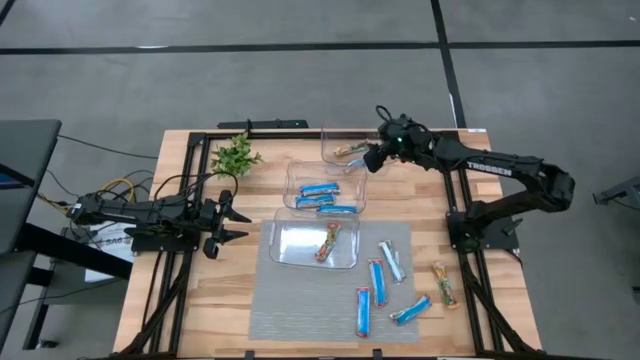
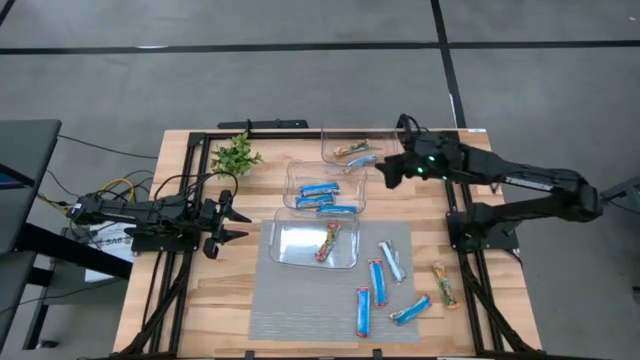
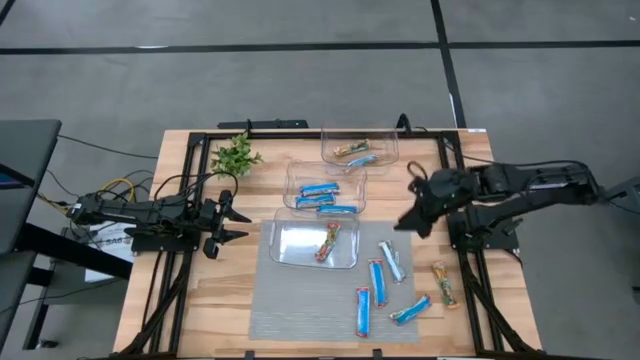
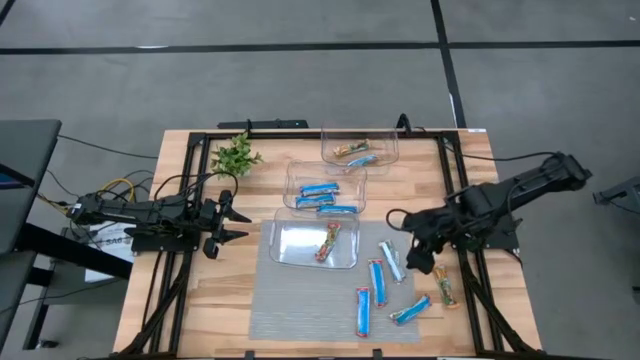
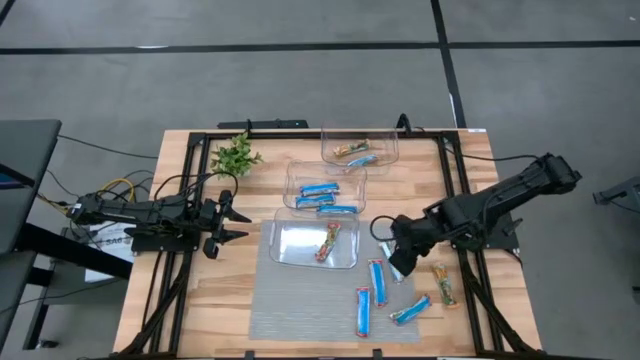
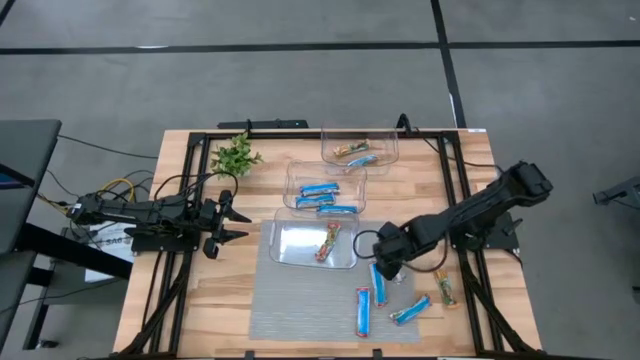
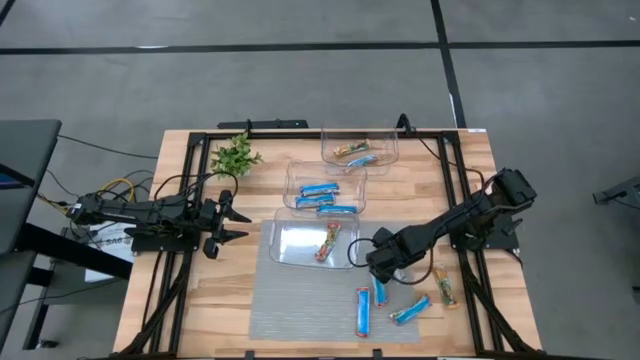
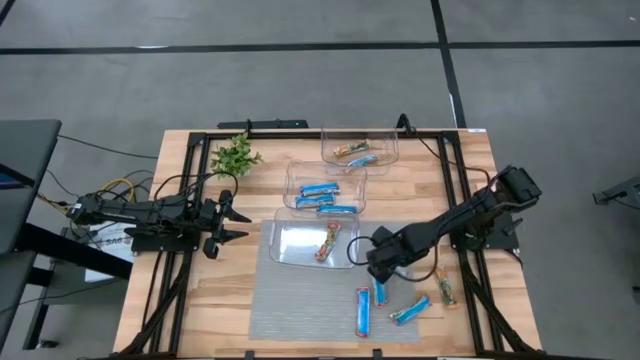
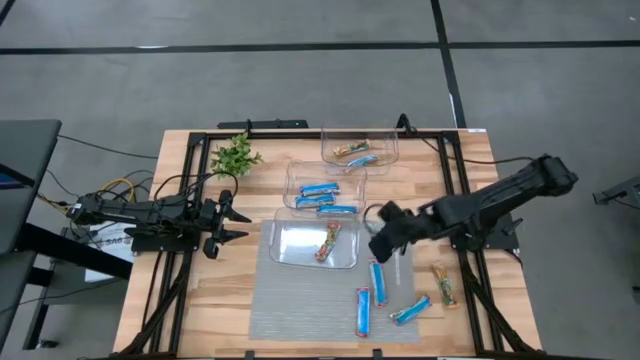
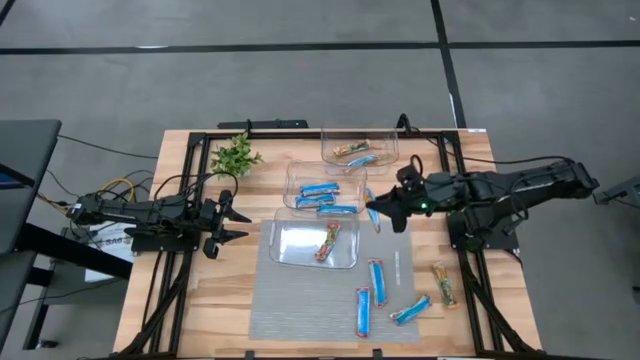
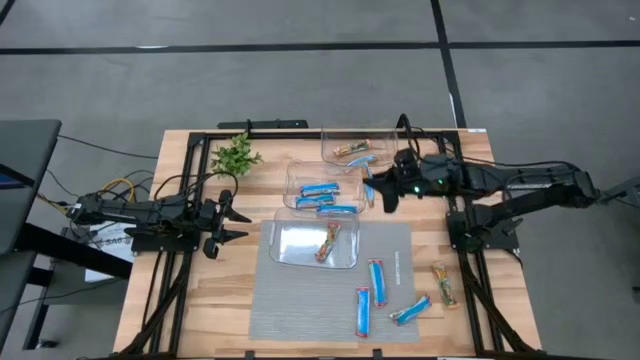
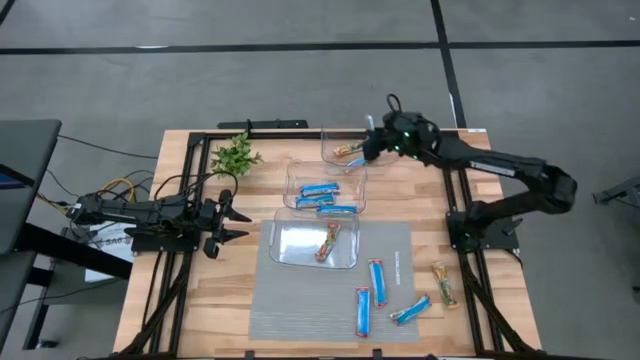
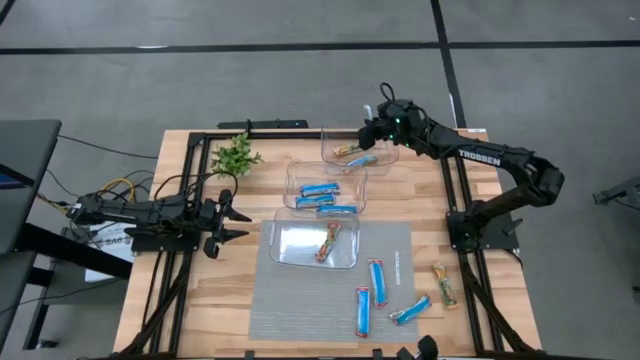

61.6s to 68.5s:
Task: Pick and place Granola Bars by type
Put the yellow granola bar into the top transparent bin

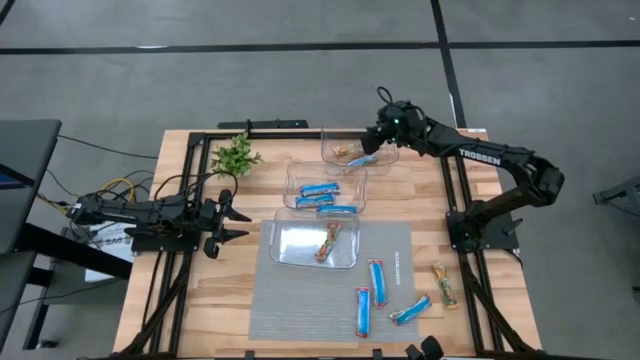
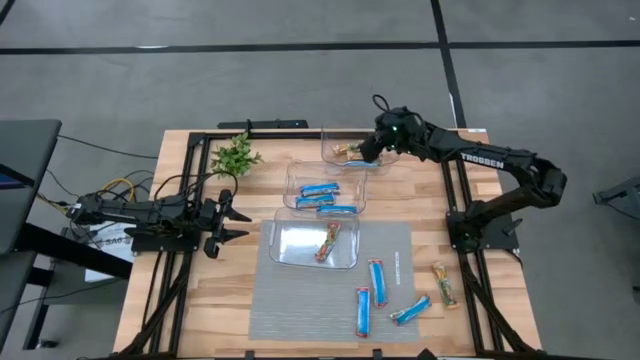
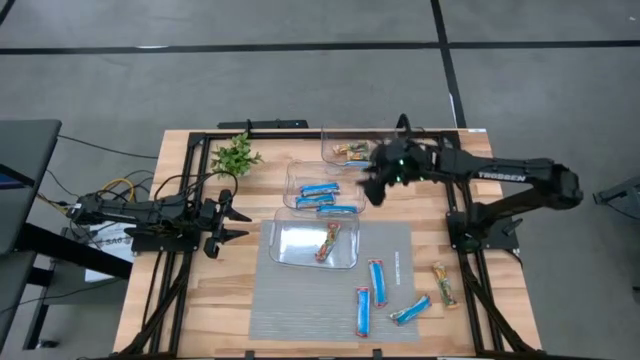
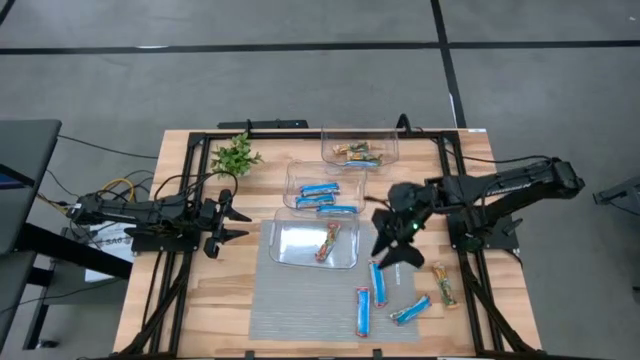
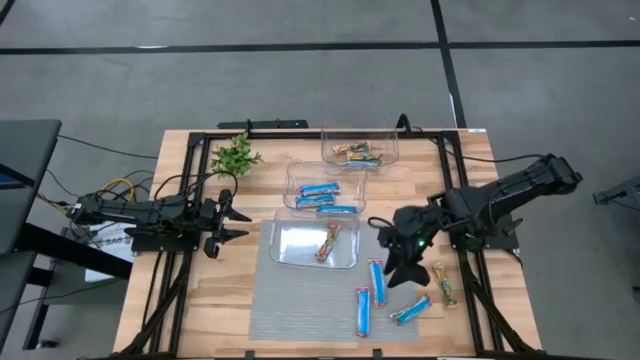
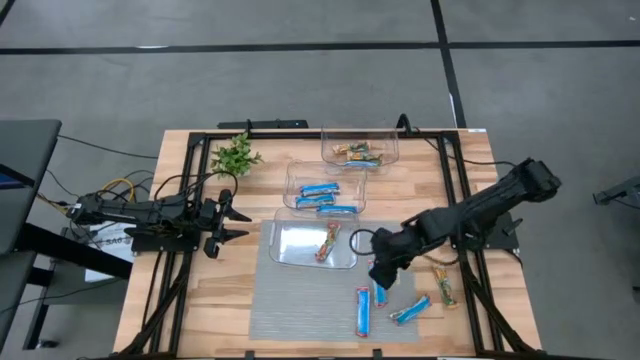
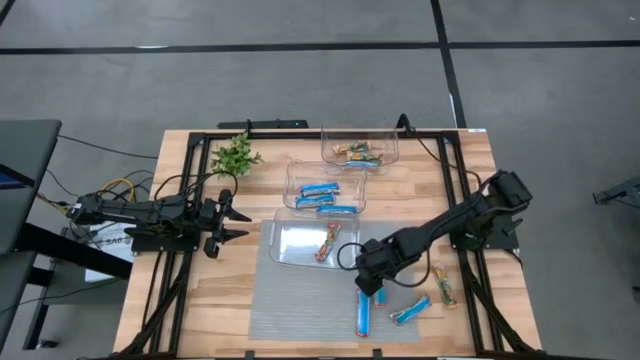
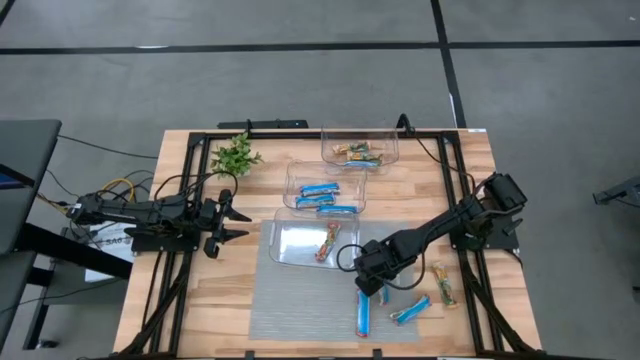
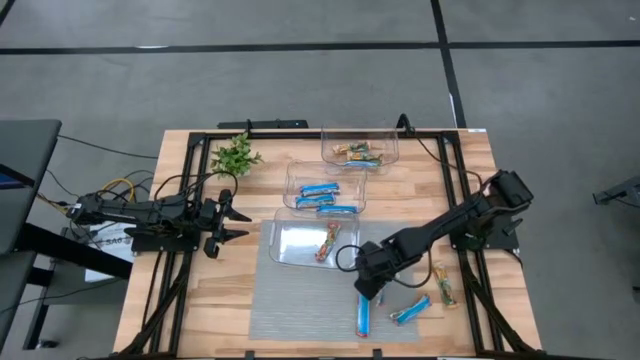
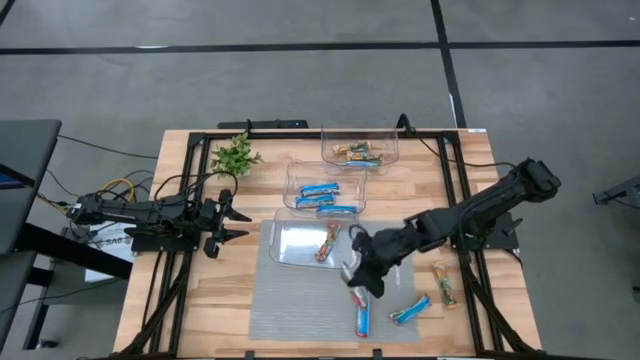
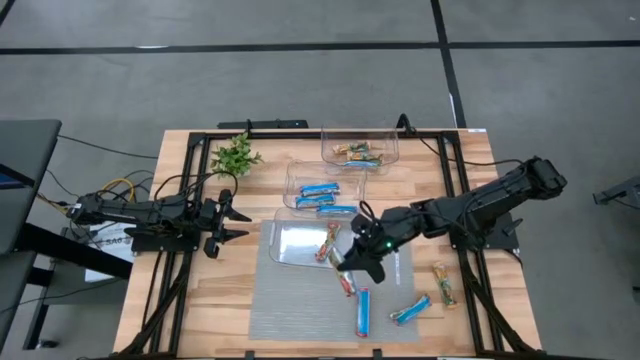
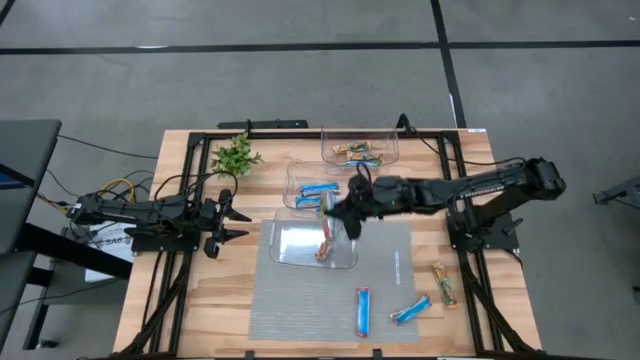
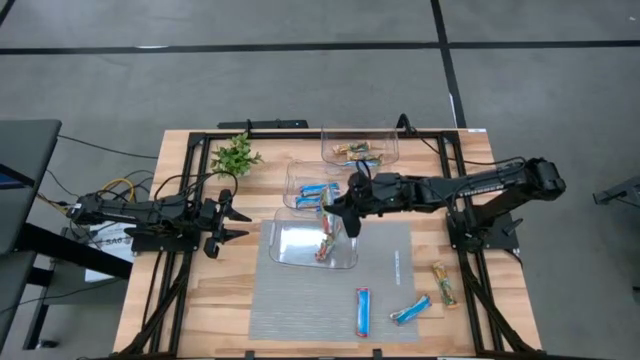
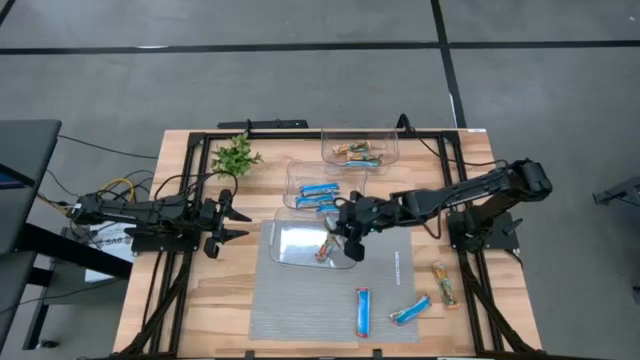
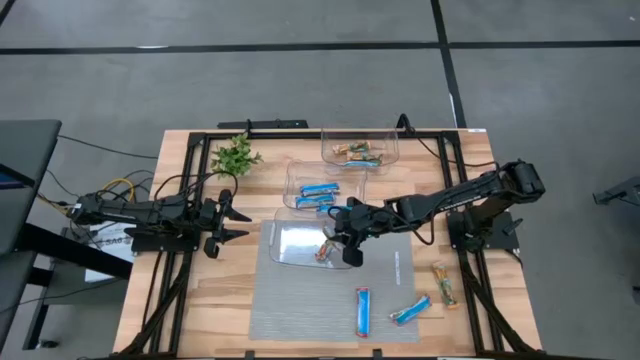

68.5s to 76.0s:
Put the red granola bar into the bottom transparent bin

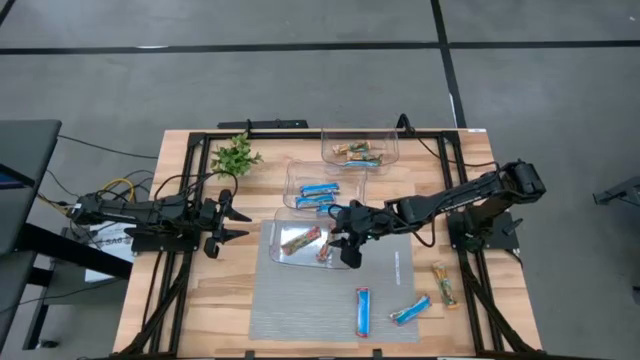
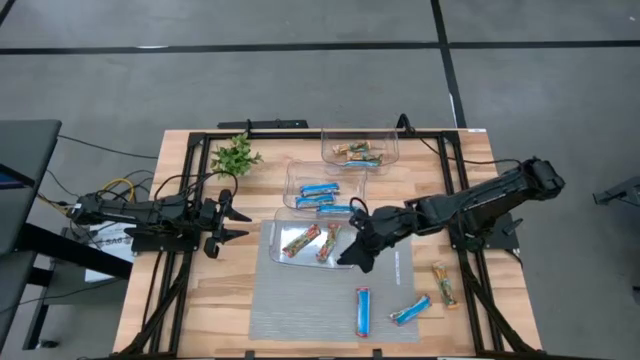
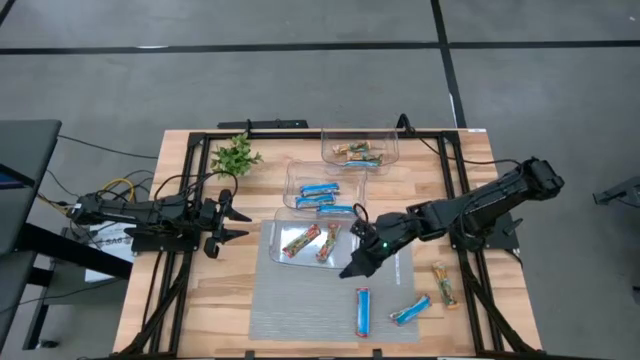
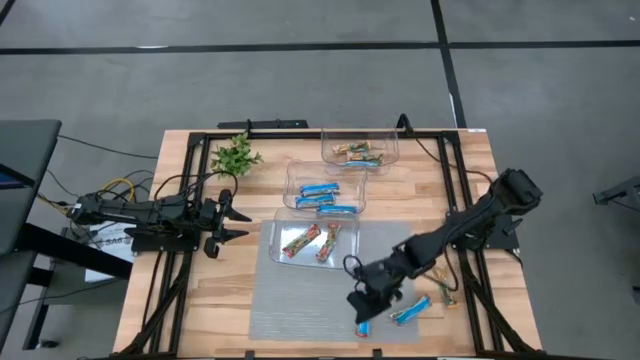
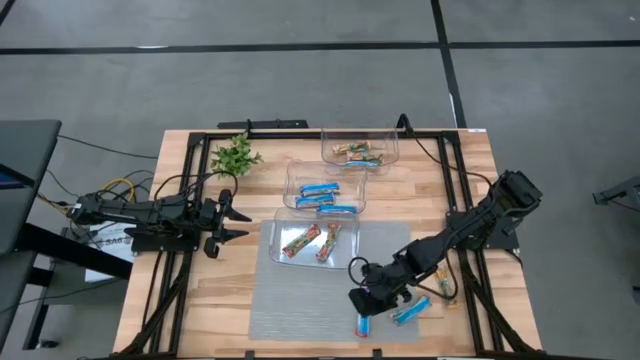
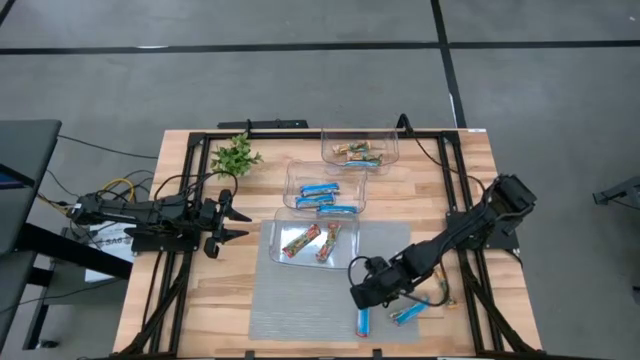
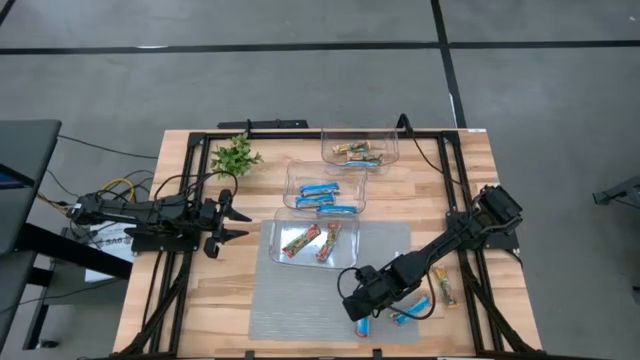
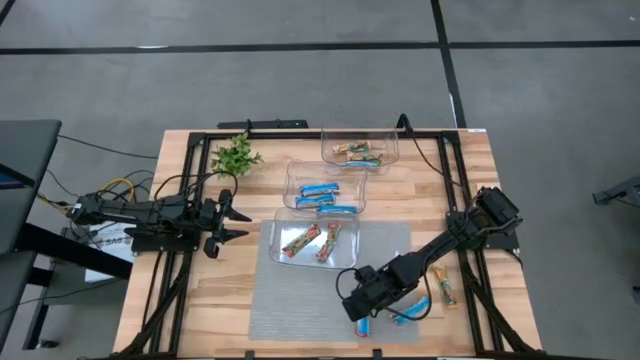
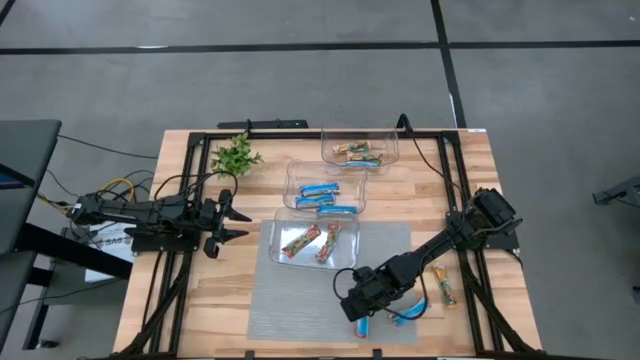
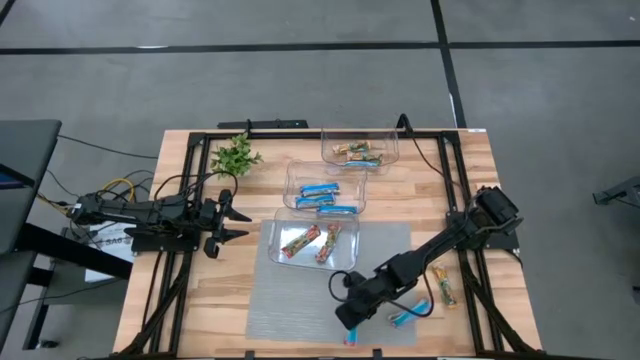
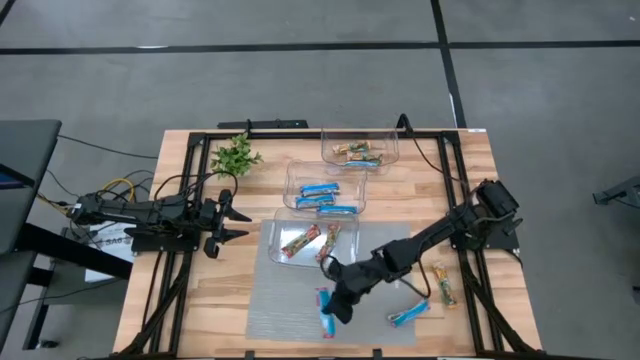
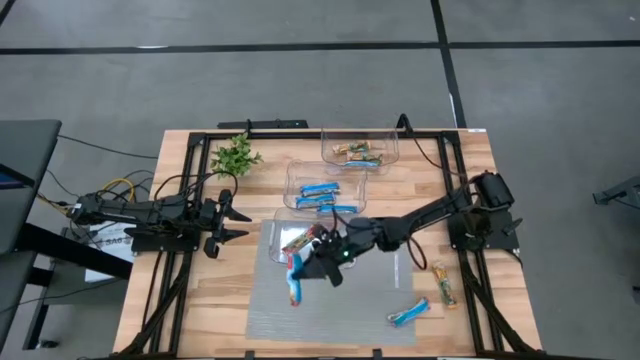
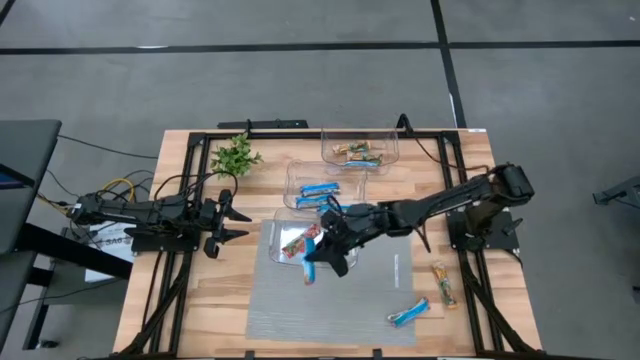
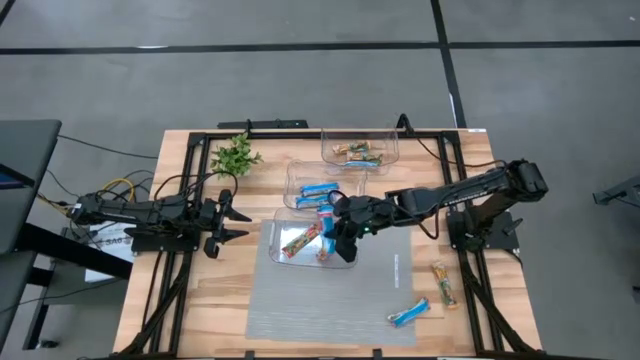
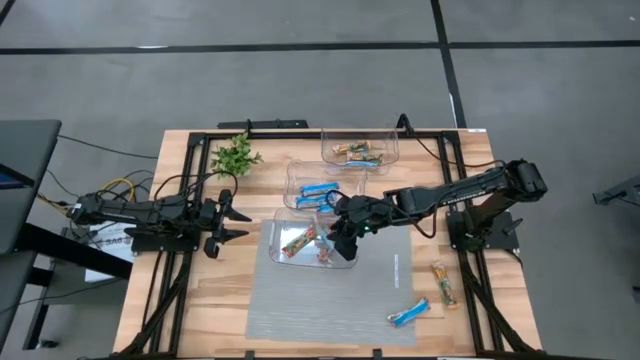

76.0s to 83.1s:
Put the red granola bar into the bottom transparent bin
